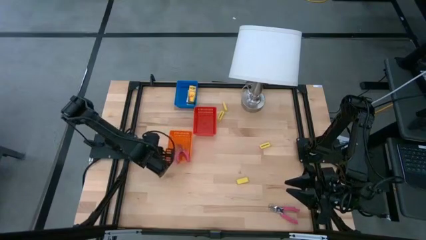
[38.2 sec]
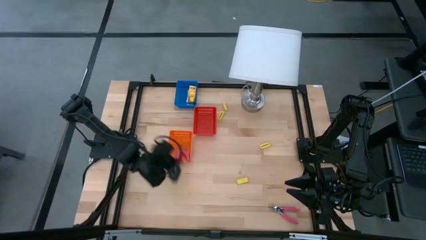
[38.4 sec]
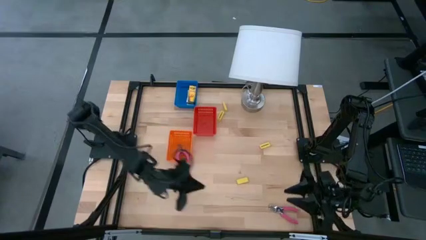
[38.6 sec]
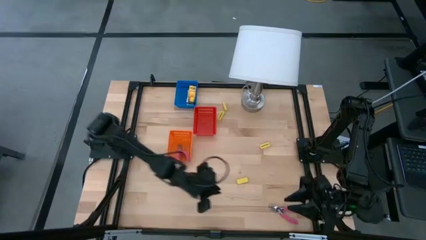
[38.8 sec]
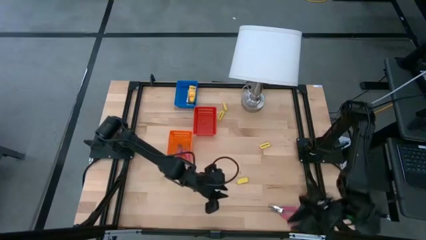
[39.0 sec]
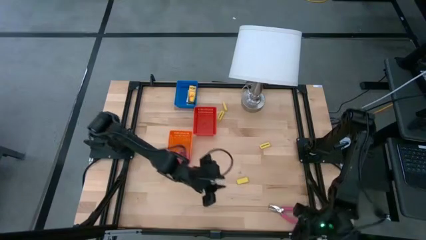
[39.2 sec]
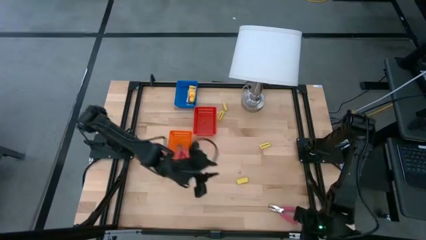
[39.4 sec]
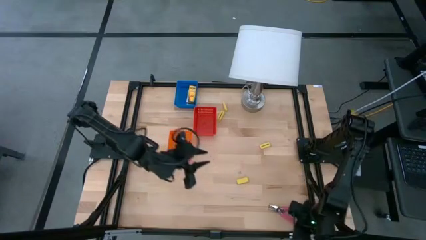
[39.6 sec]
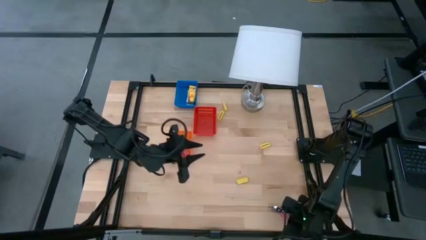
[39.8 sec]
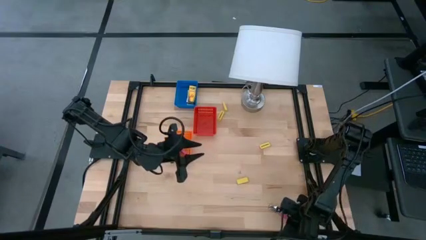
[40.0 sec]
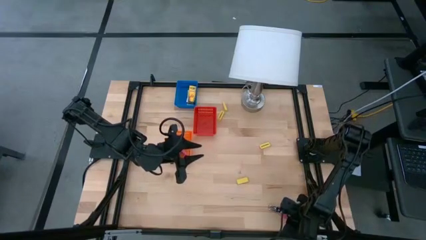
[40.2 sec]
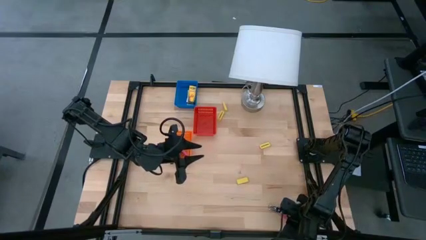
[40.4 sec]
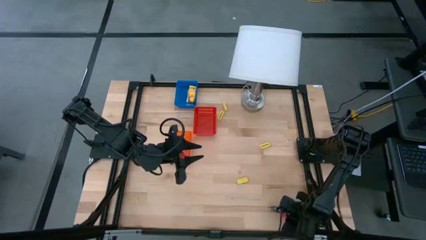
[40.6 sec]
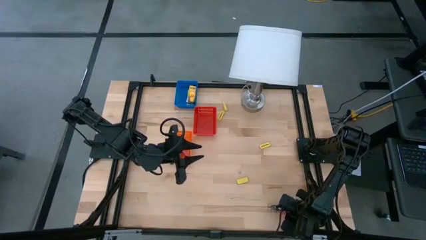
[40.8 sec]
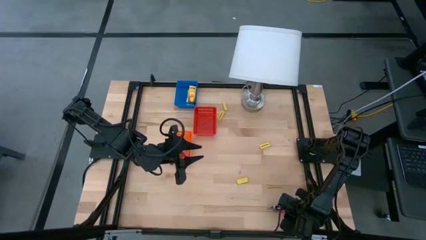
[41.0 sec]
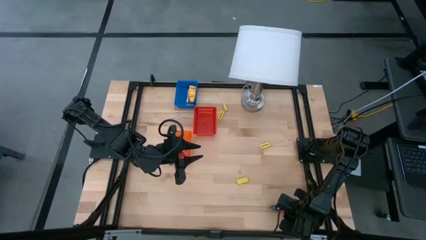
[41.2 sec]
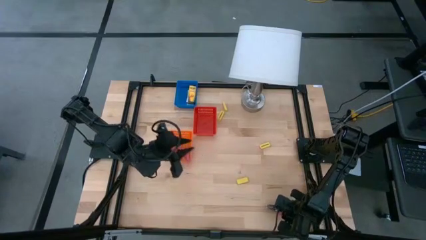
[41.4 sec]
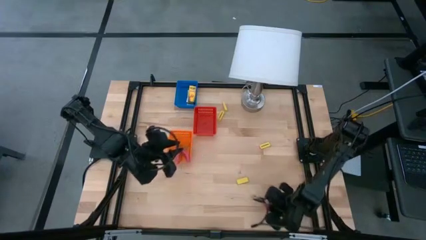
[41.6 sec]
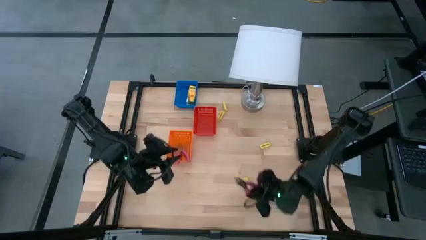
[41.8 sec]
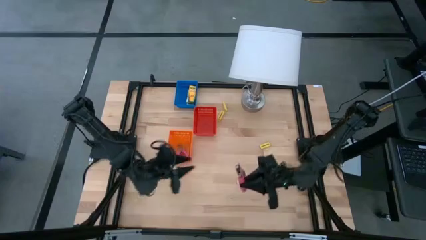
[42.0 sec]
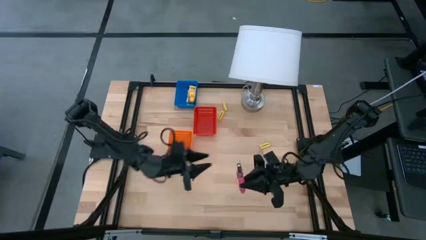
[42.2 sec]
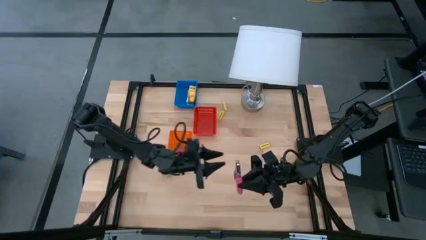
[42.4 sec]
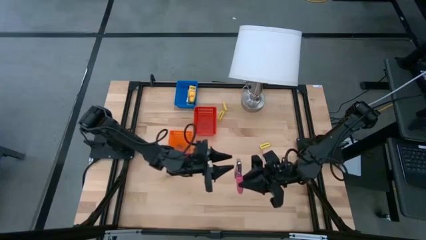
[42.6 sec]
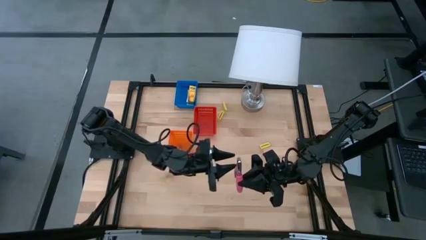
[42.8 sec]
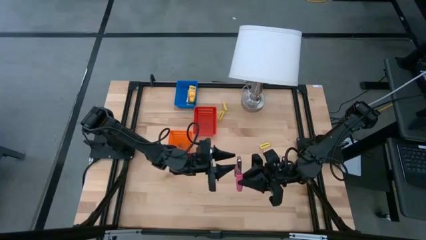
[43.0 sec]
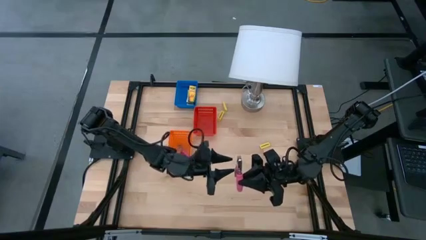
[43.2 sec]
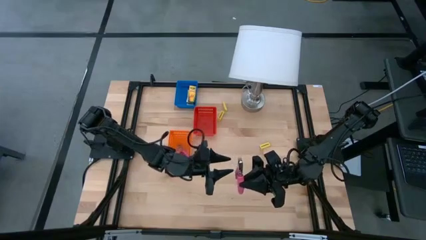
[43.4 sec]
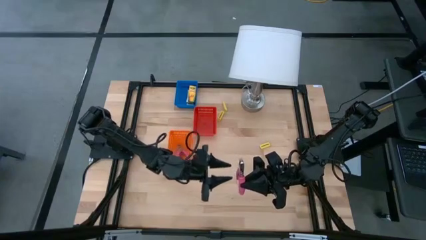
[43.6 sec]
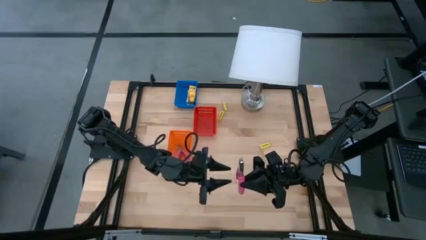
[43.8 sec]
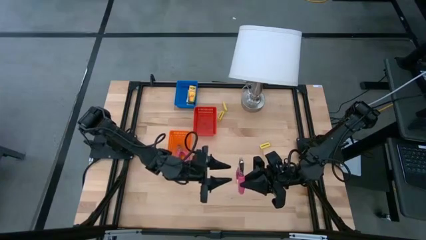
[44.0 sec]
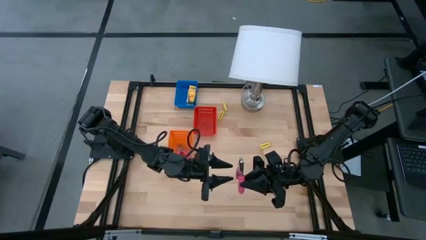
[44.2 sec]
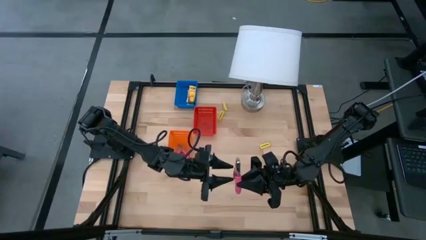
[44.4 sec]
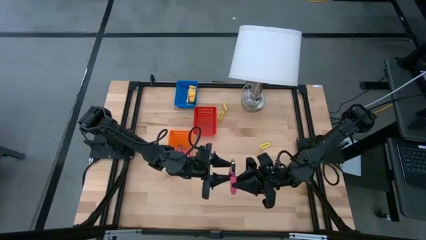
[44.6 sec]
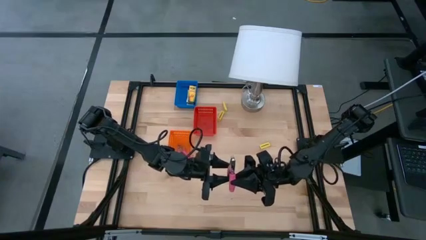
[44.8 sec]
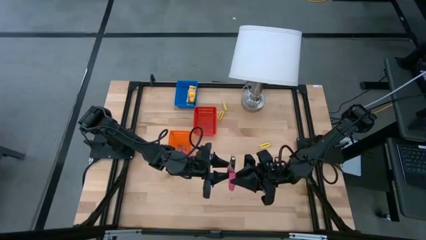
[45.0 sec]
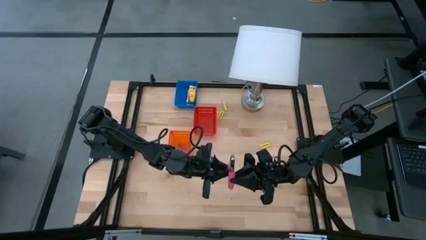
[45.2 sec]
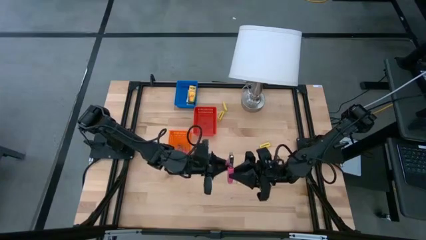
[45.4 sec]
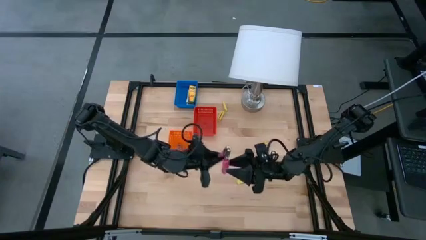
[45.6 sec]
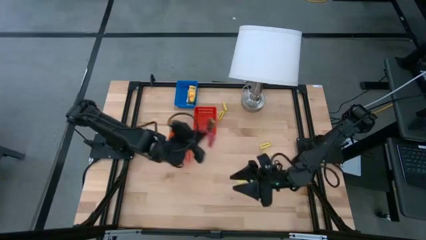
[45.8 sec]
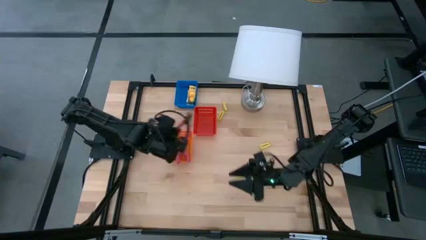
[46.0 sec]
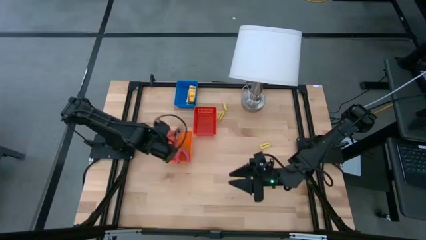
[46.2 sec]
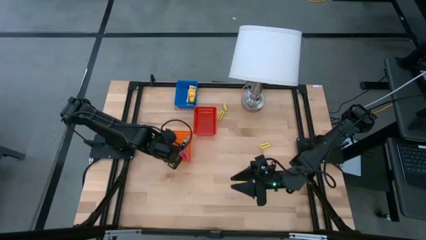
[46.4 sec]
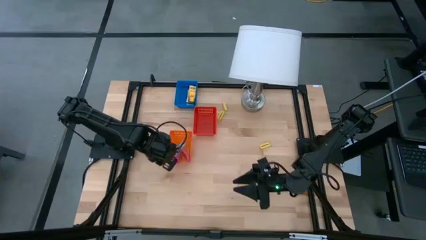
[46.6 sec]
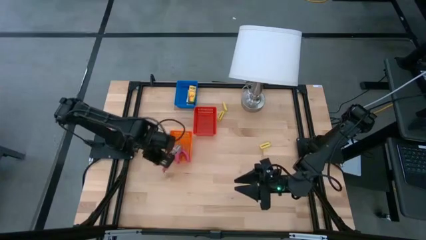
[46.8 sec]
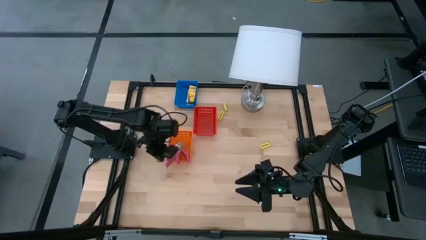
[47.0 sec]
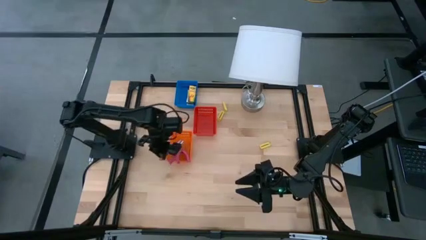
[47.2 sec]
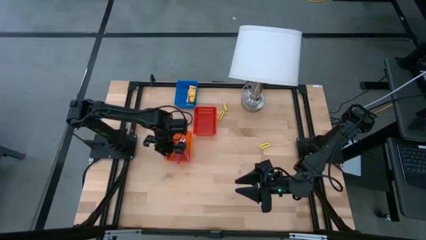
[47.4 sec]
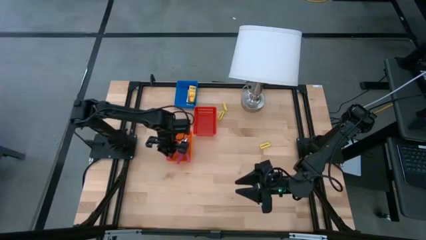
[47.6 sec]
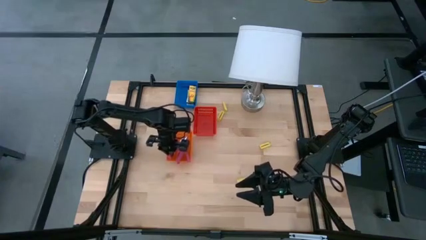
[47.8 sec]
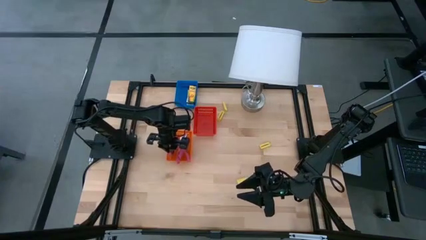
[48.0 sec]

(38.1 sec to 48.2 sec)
Task: Pick & Place School Supplies
Put the pink hole puncher into the orange bin

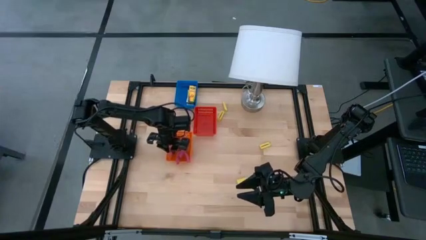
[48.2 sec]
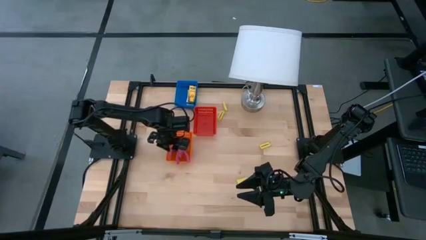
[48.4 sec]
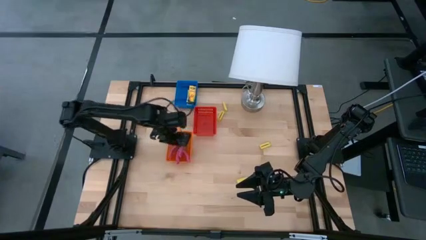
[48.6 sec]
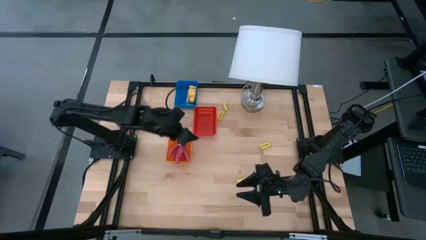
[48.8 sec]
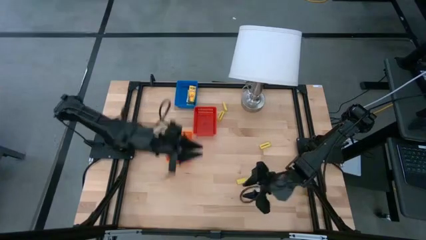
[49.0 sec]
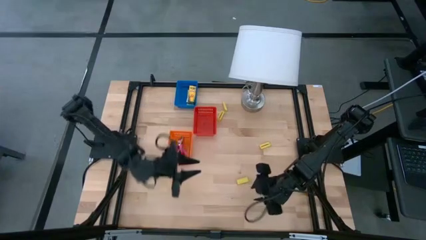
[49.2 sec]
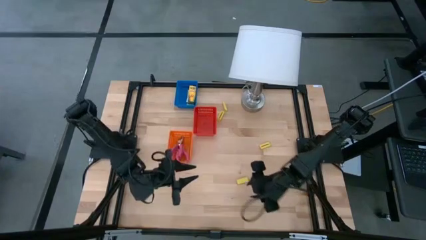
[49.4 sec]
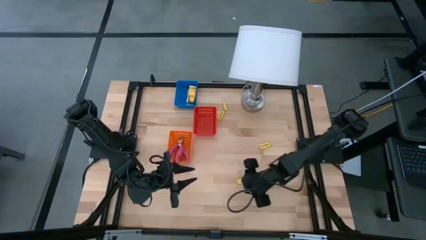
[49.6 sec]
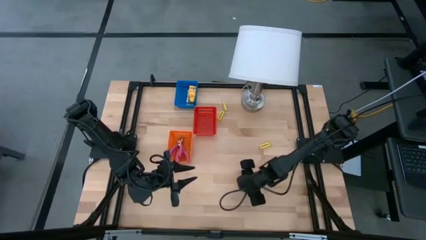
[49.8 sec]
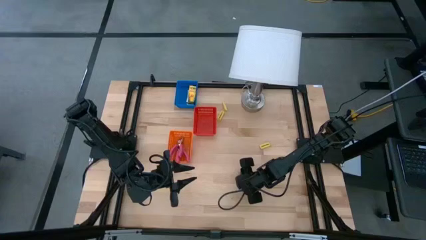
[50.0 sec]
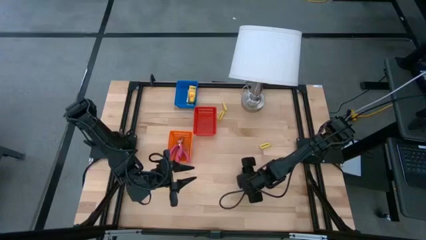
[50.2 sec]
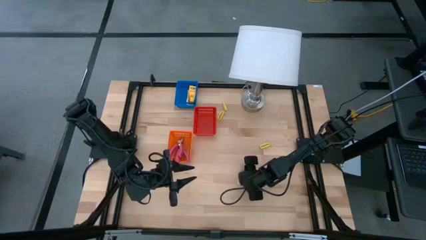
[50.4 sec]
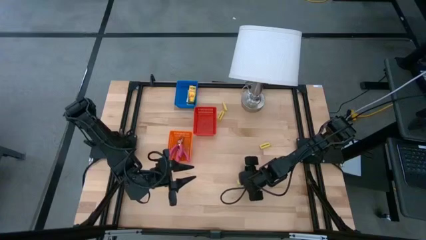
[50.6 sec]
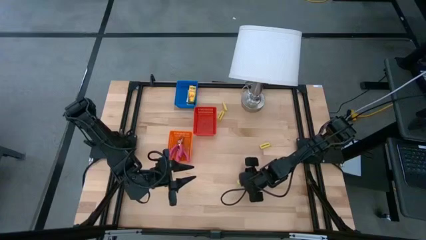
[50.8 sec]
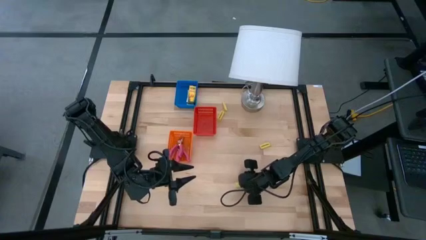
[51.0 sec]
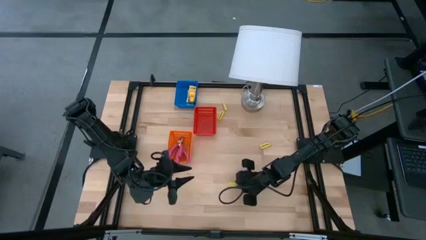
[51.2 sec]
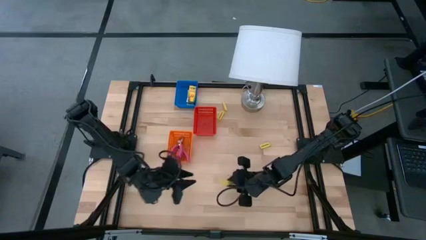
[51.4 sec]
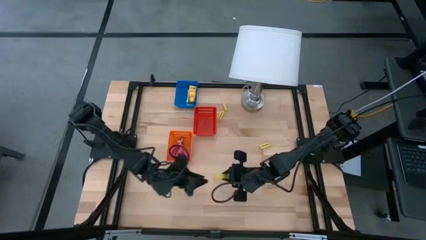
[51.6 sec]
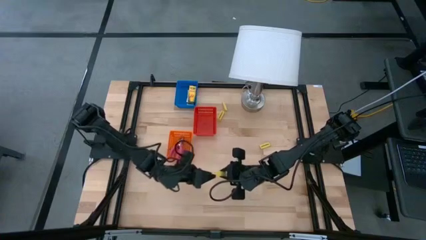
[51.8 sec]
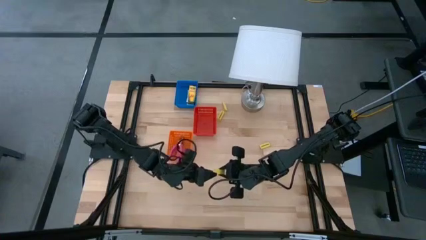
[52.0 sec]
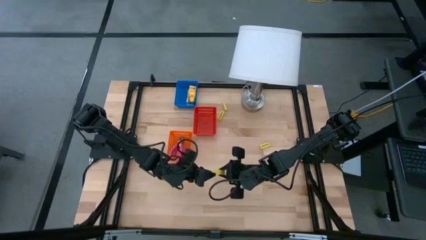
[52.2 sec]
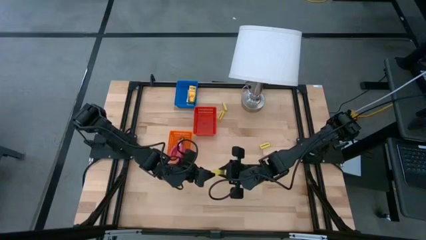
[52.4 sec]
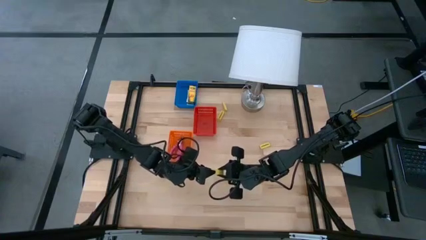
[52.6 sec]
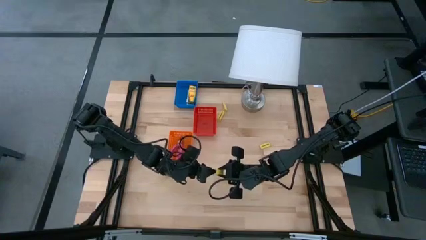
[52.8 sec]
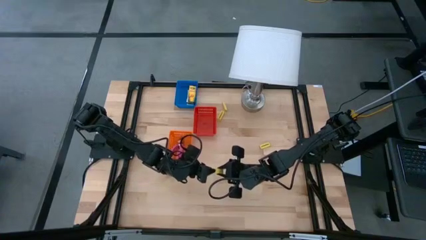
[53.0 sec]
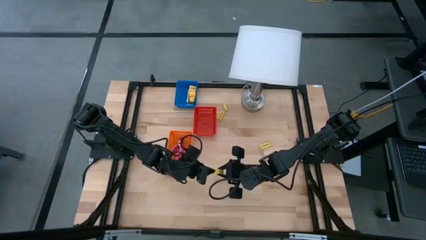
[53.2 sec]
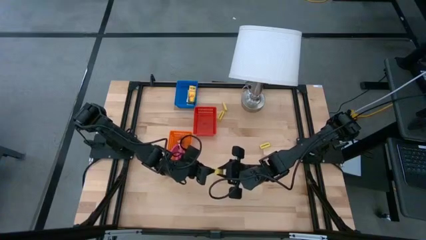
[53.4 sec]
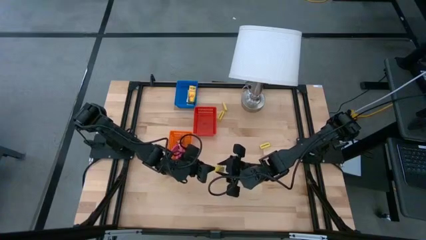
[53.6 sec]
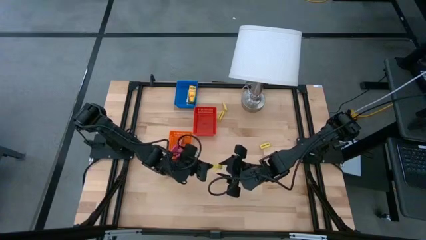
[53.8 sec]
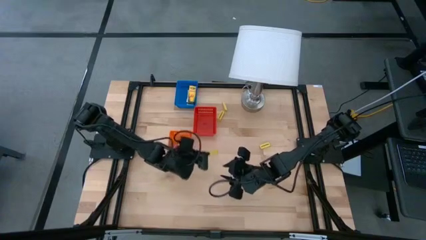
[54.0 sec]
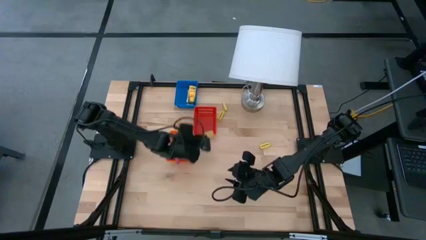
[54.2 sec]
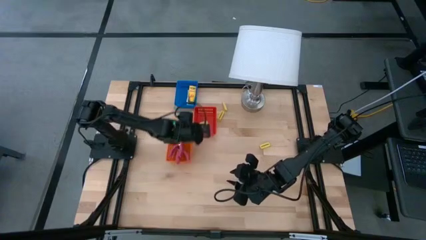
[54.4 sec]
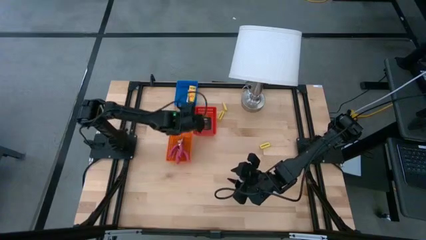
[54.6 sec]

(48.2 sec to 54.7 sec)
Put the yellow eraser into the red bin
